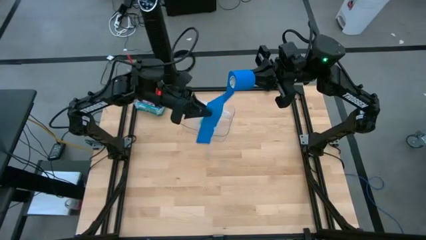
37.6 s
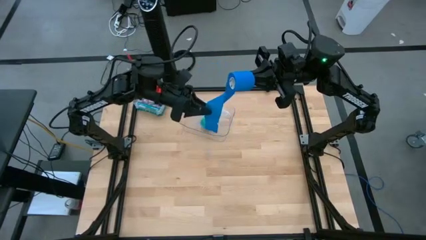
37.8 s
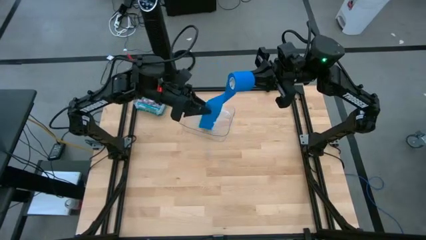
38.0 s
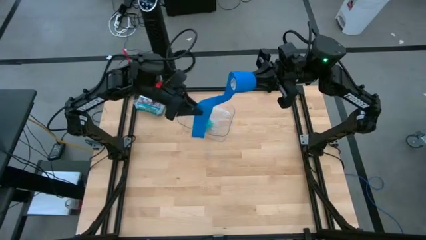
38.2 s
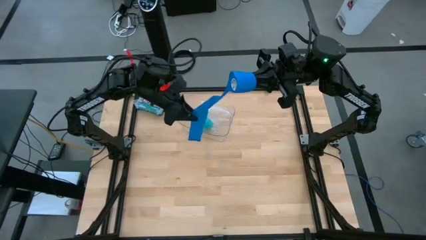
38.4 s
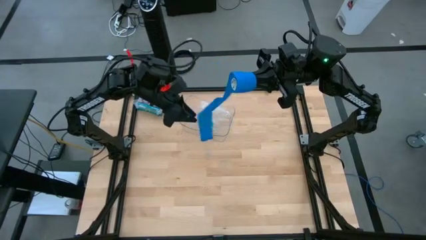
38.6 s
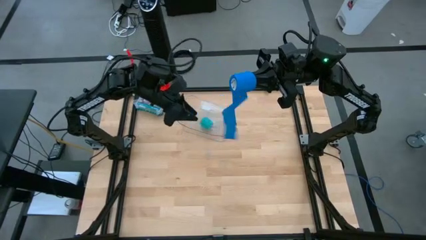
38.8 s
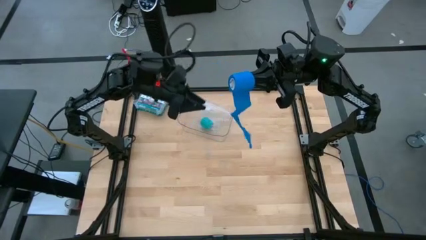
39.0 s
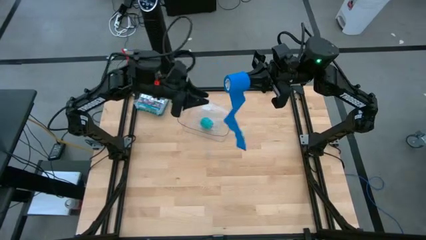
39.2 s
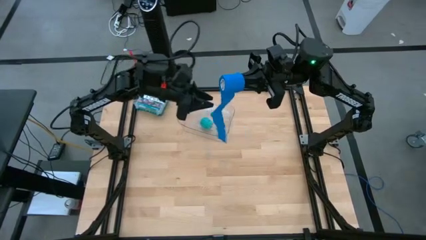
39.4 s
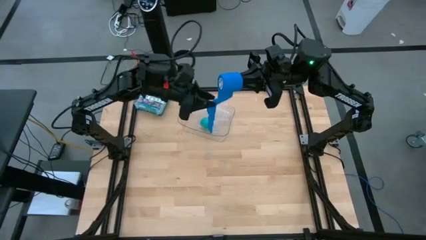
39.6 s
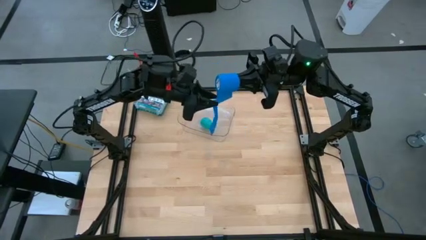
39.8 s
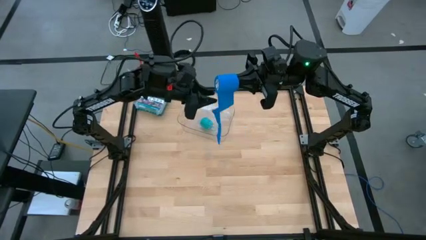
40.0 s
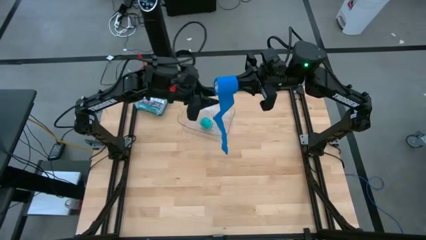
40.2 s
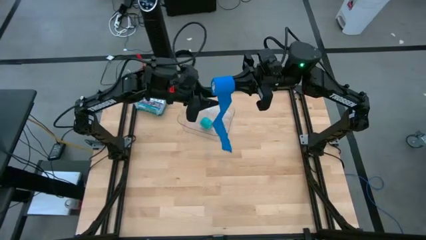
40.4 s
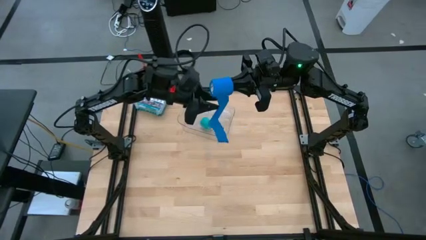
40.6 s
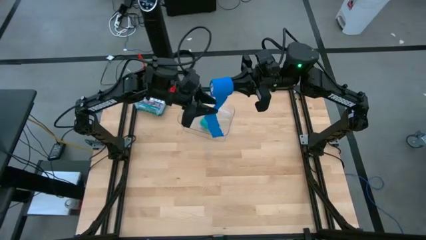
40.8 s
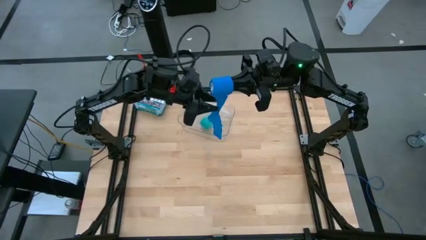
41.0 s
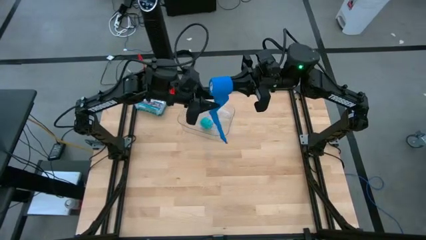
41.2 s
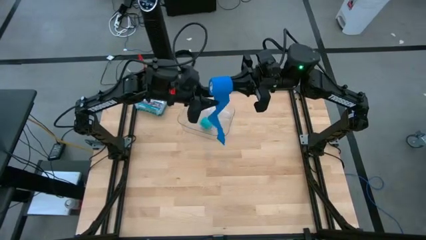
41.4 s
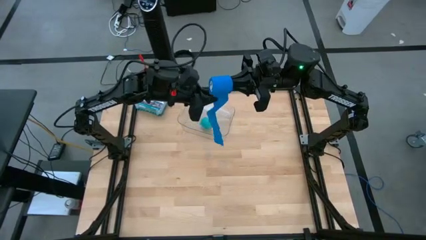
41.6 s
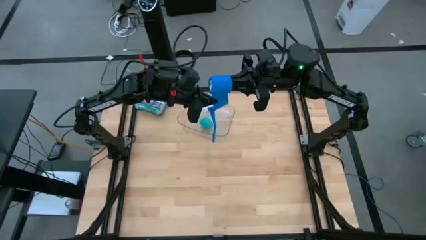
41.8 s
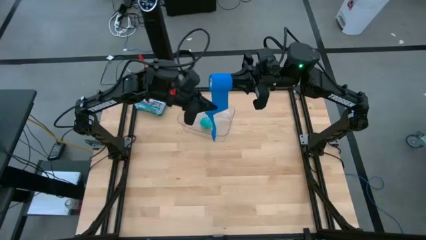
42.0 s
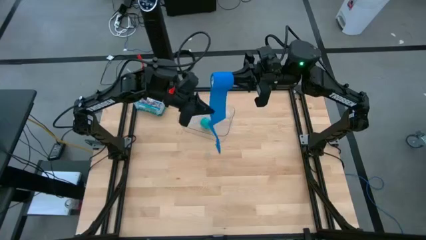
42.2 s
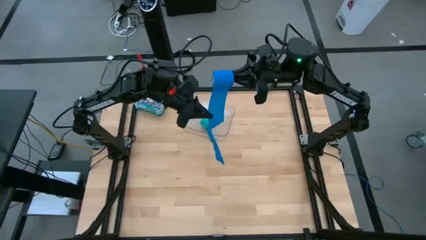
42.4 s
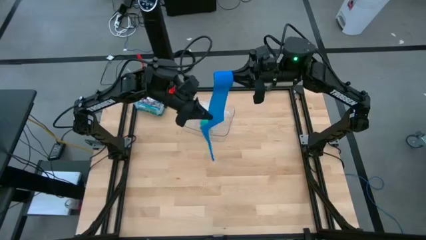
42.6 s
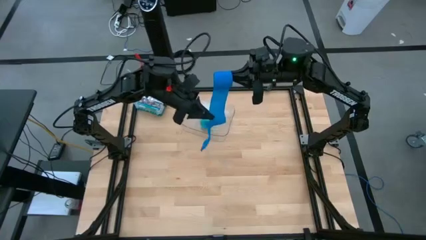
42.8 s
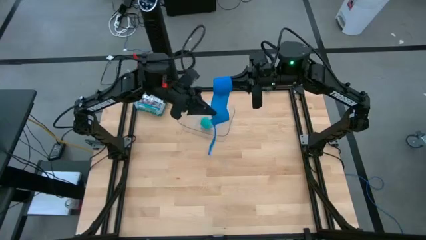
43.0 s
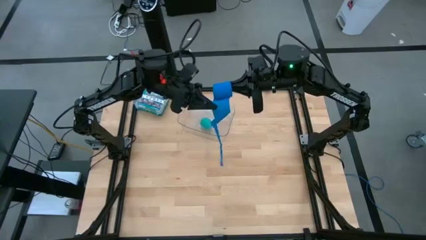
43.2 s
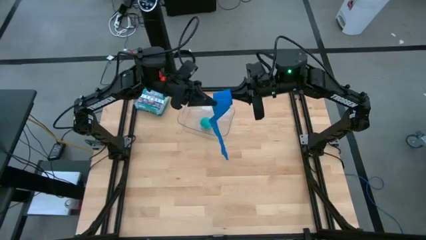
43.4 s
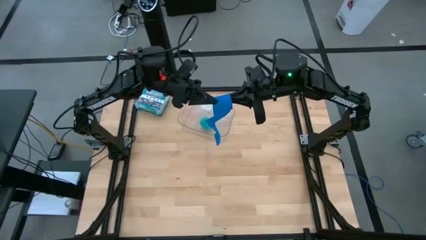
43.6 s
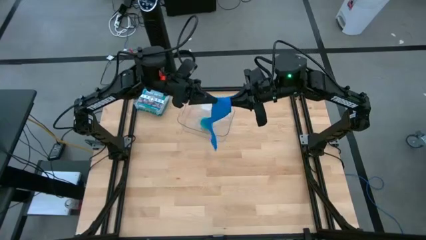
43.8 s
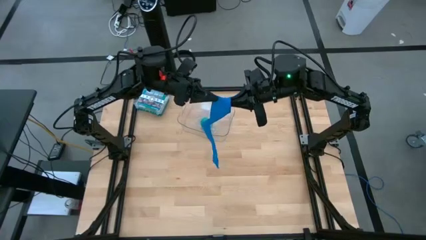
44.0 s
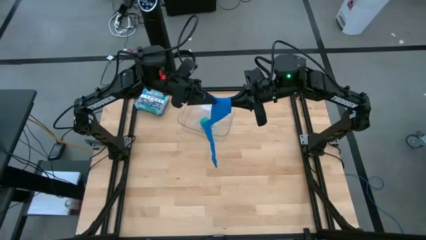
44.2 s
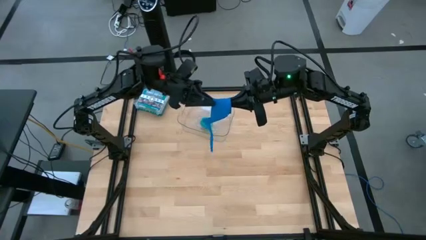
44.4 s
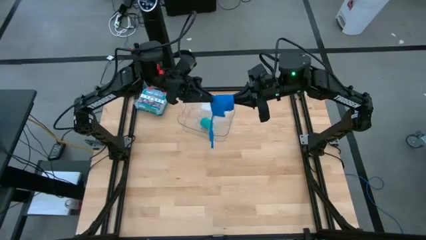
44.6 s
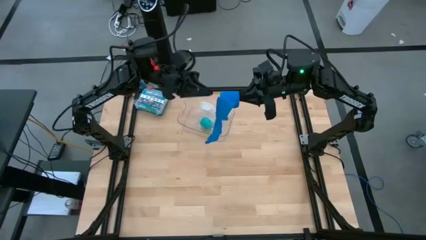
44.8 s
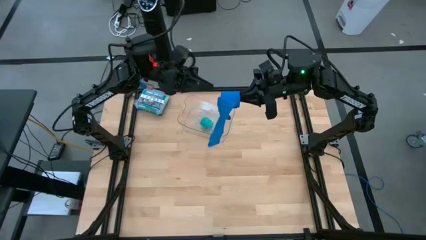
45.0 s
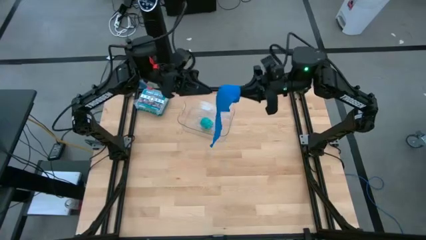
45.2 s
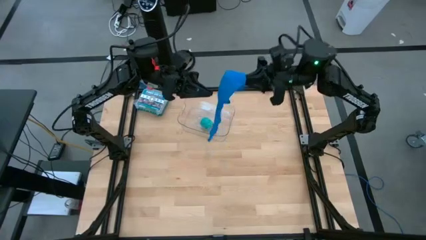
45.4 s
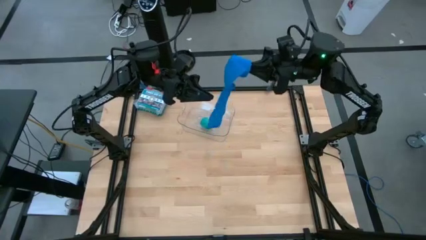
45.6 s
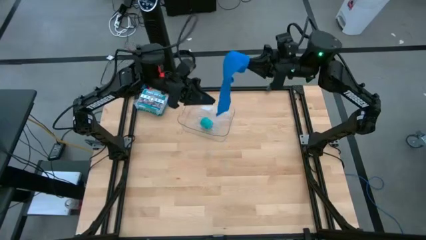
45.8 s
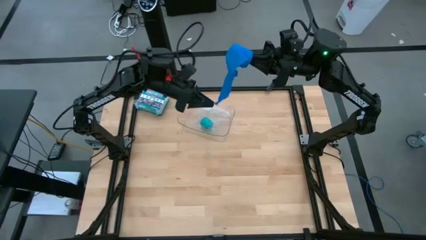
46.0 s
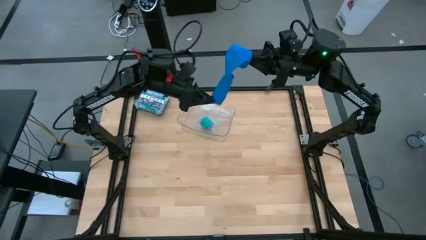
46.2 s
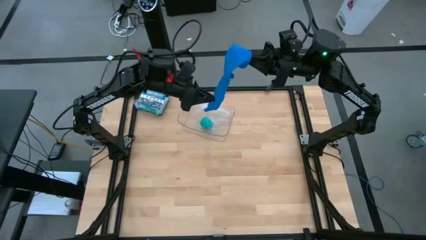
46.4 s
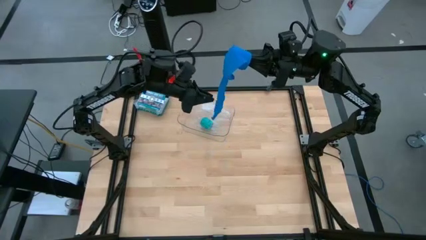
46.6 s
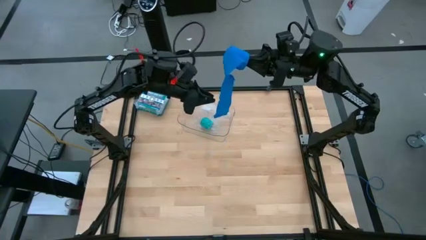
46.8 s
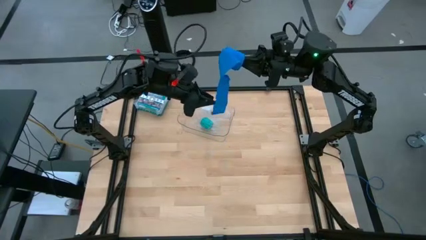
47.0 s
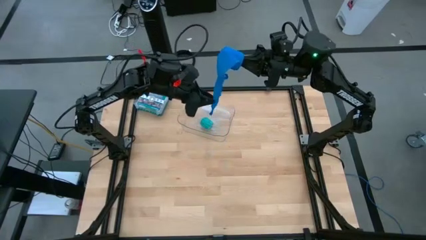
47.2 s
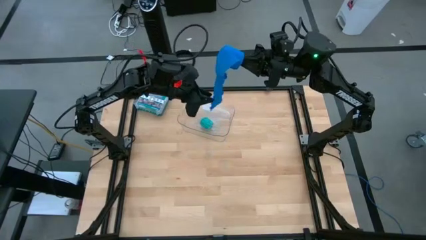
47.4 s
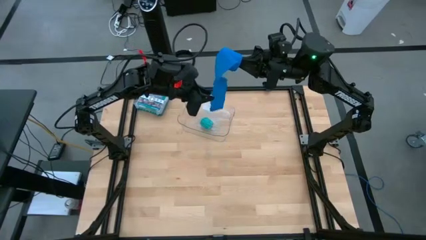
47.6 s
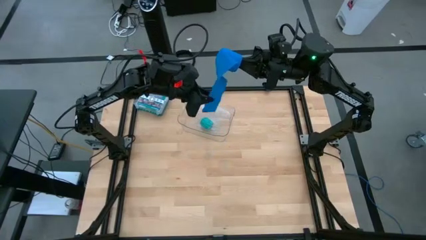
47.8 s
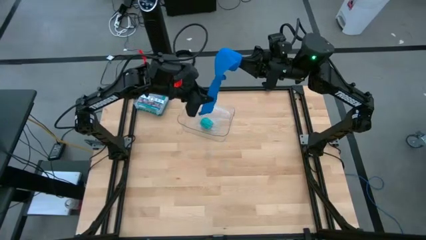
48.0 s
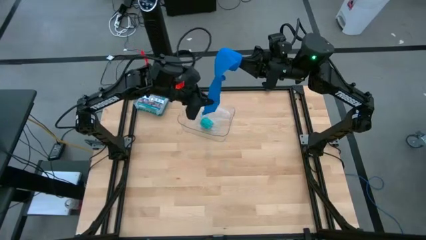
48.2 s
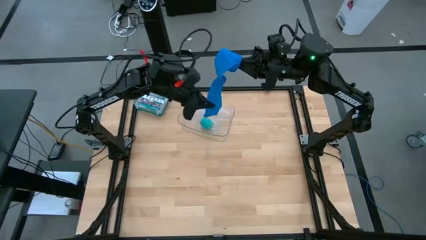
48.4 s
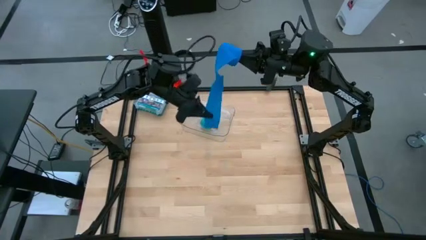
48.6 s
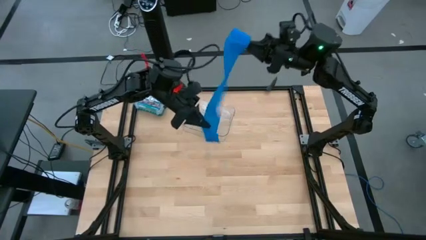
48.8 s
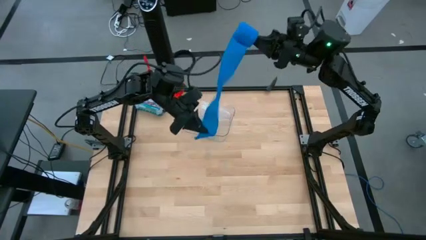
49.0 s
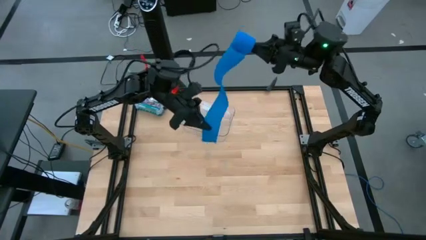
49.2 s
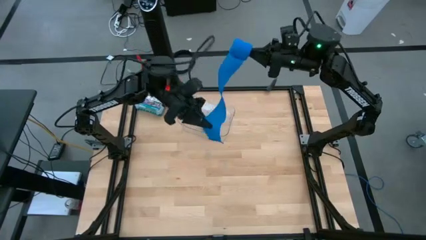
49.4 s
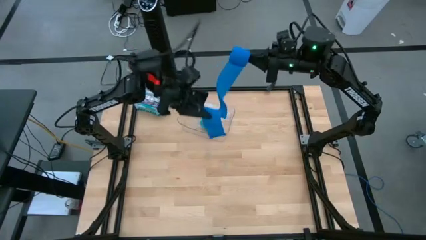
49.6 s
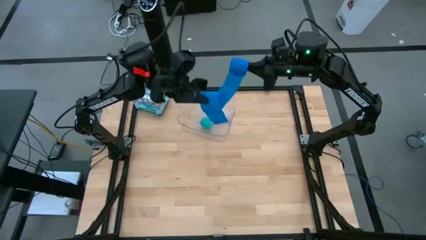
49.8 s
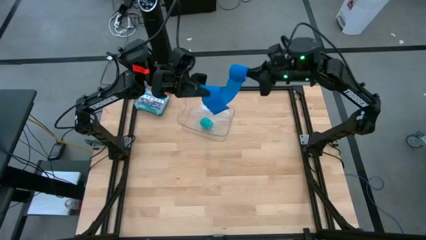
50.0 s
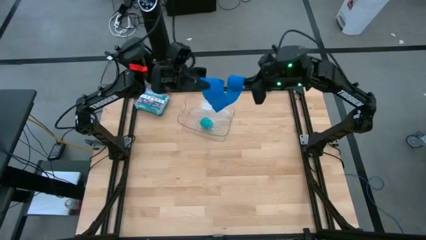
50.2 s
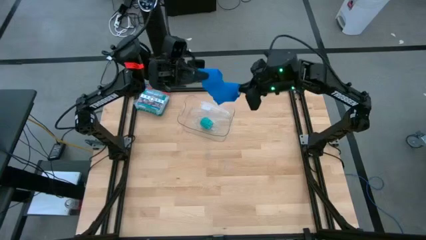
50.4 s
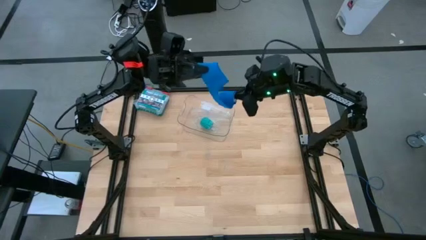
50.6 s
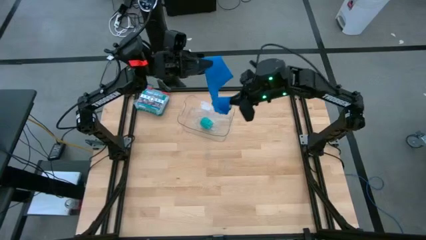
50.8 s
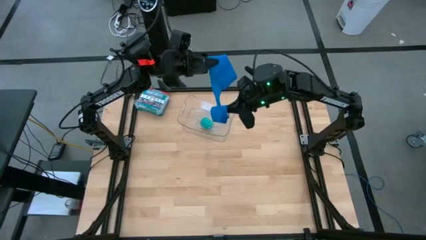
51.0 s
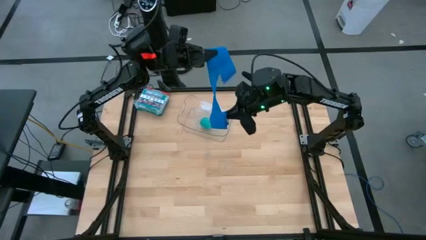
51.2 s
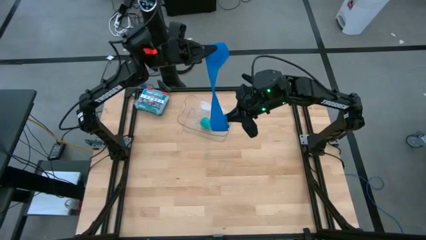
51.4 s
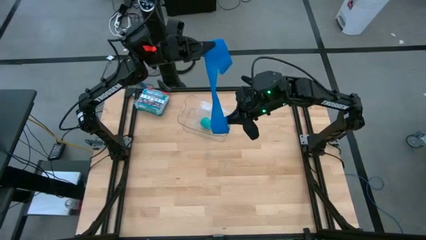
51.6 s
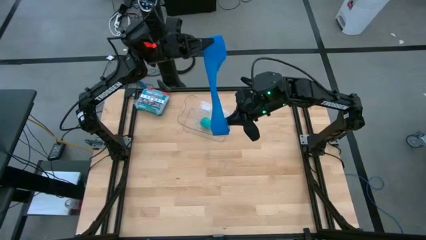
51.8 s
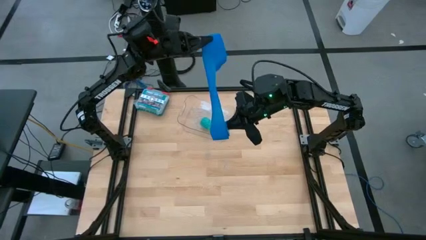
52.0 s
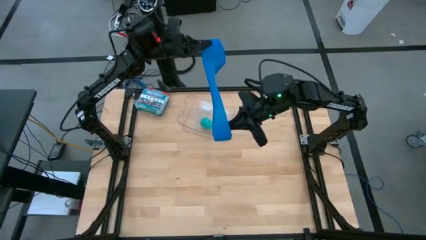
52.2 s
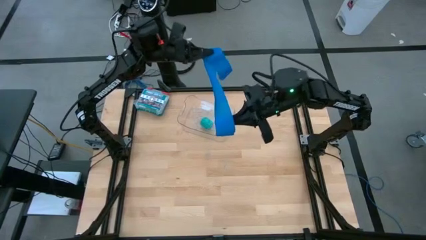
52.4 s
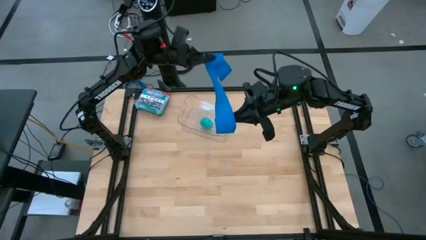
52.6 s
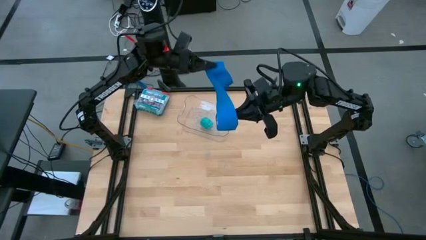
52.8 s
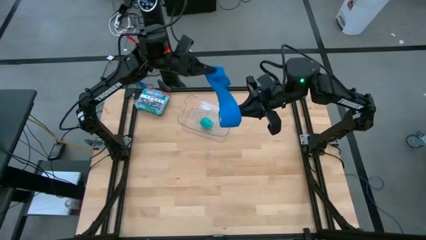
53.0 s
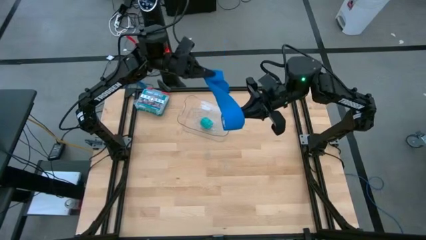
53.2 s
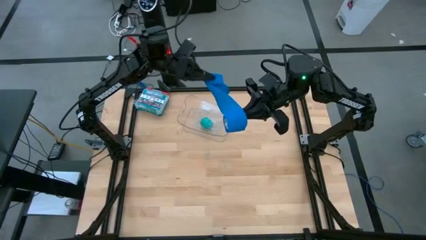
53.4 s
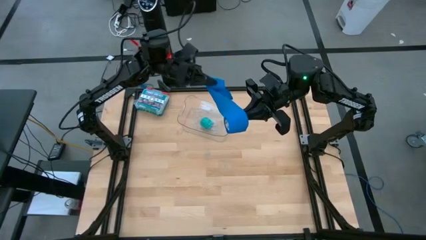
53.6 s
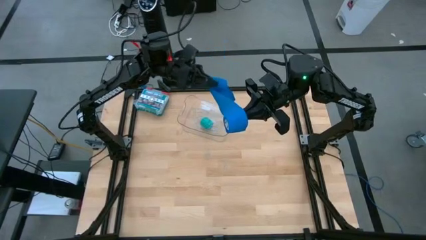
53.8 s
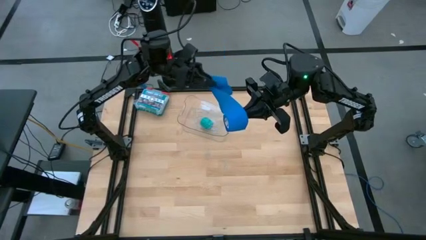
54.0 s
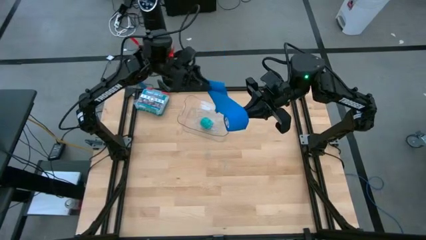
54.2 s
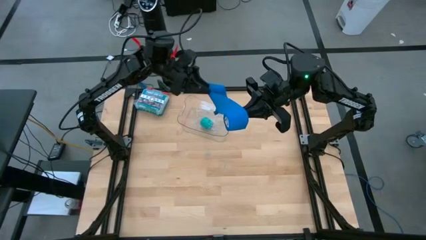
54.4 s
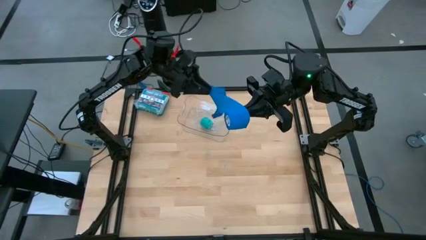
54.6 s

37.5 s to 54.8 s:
Task: Roll bandage
Roll the blue bandage
